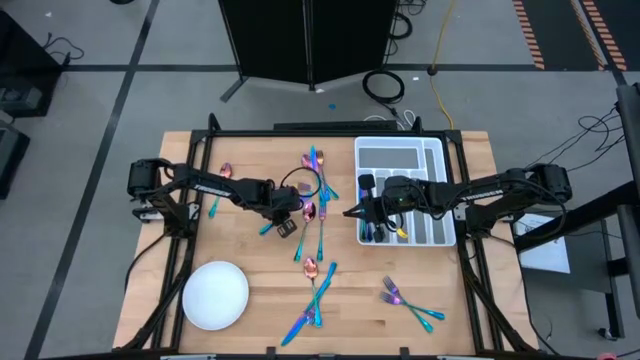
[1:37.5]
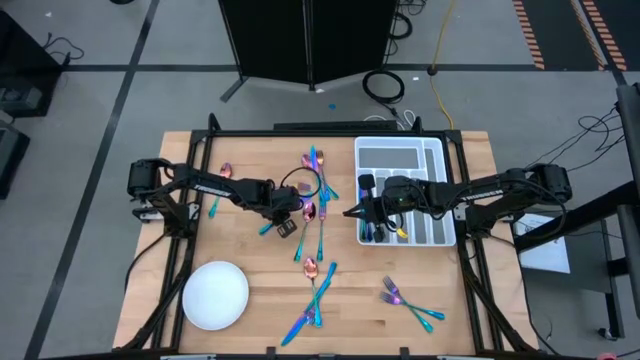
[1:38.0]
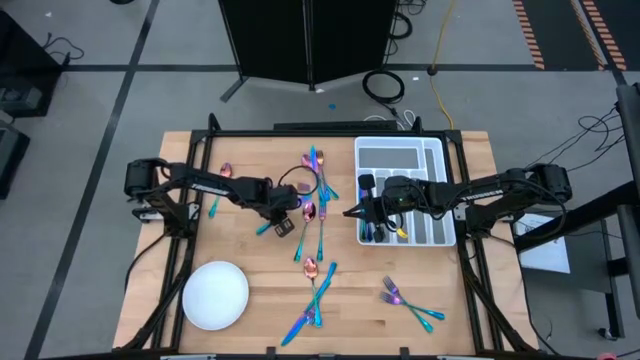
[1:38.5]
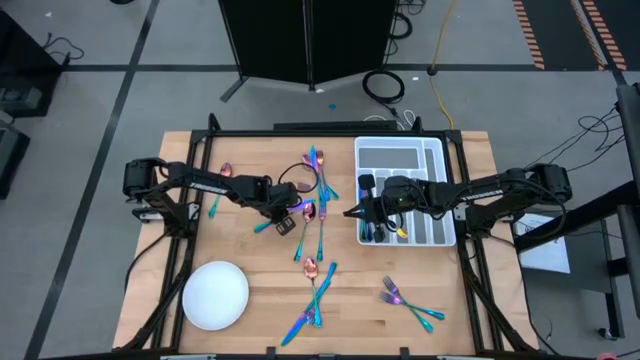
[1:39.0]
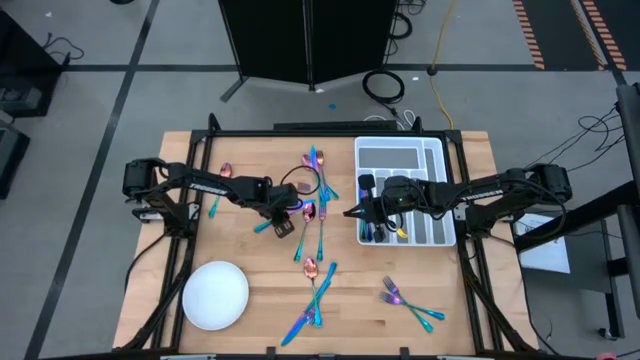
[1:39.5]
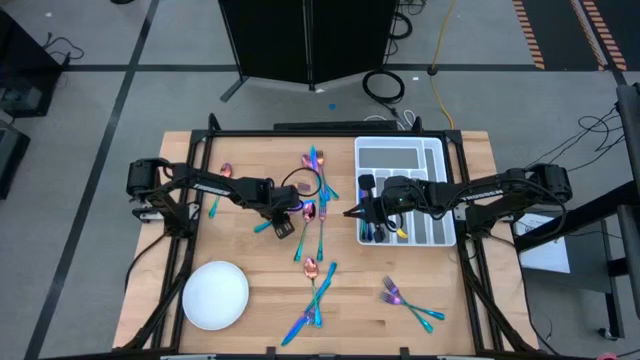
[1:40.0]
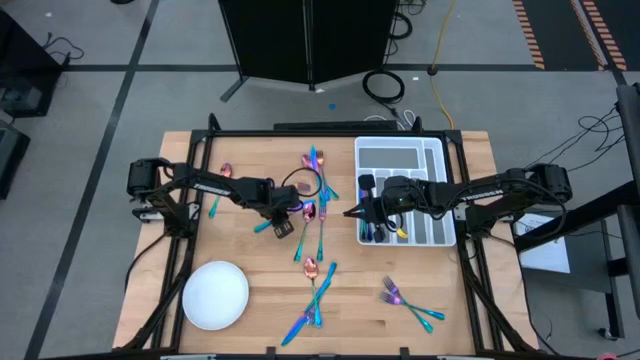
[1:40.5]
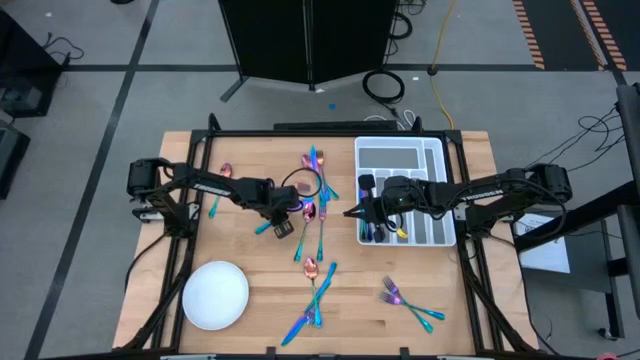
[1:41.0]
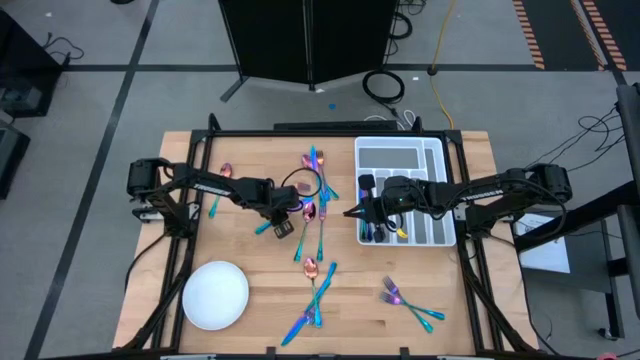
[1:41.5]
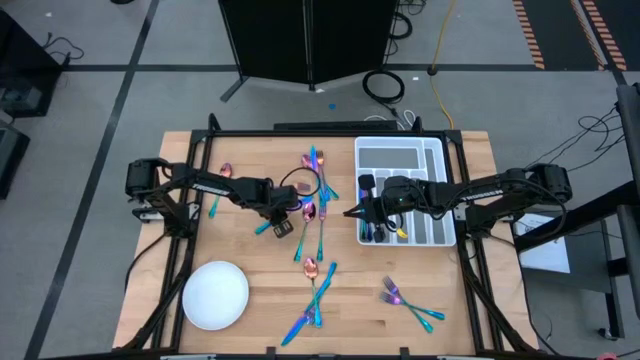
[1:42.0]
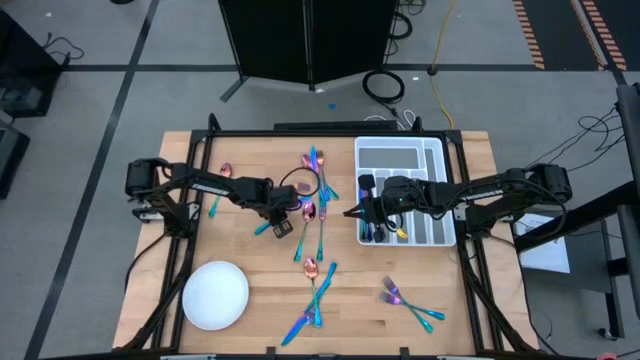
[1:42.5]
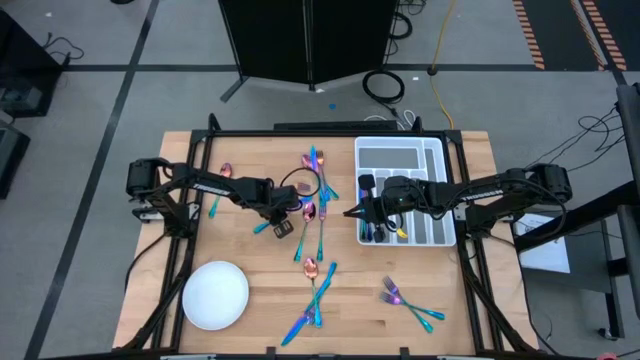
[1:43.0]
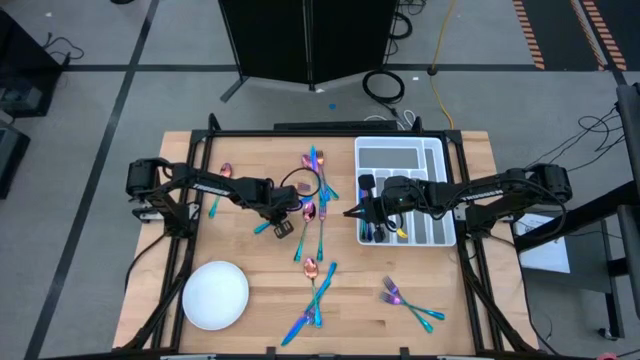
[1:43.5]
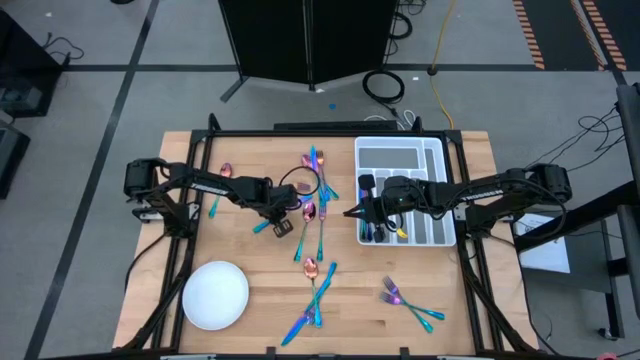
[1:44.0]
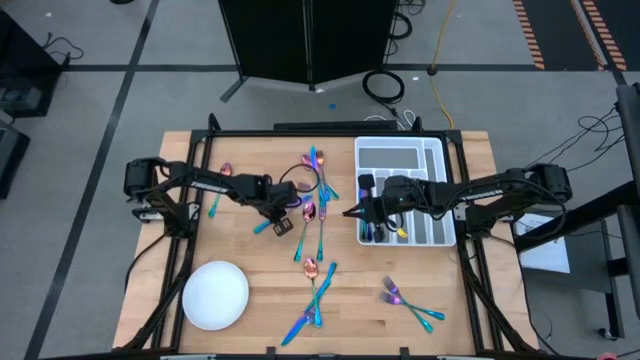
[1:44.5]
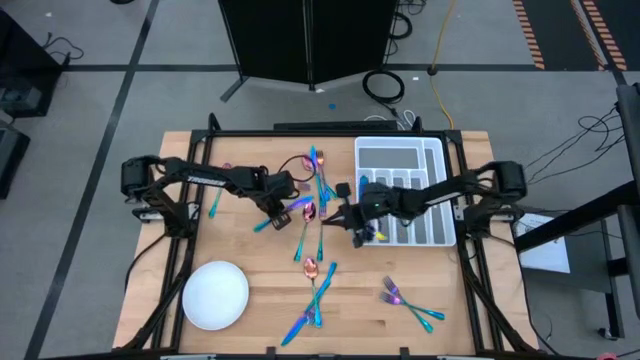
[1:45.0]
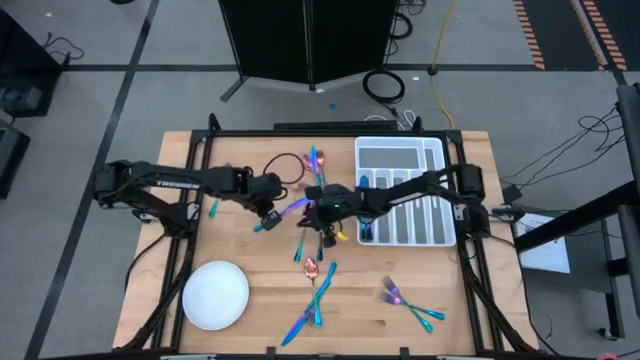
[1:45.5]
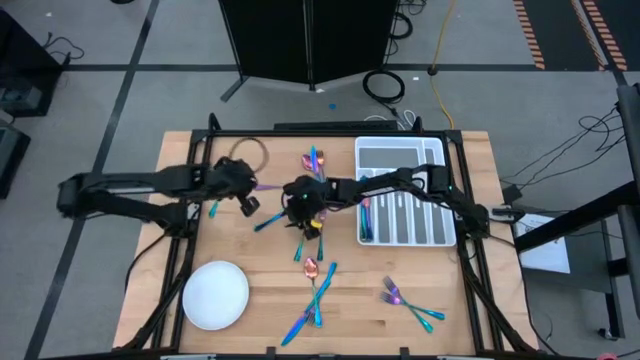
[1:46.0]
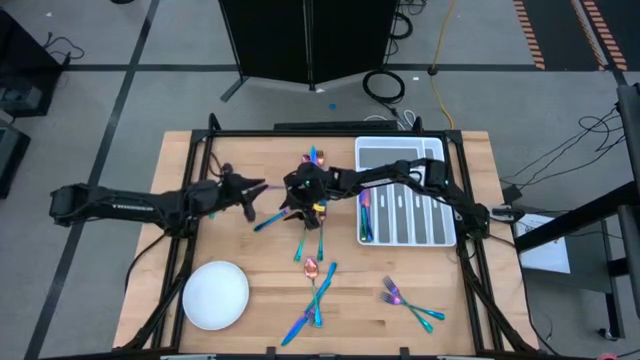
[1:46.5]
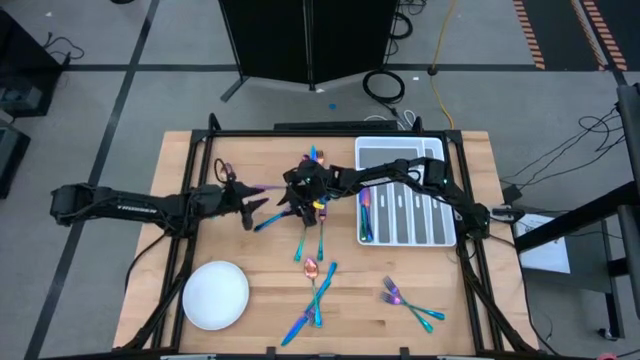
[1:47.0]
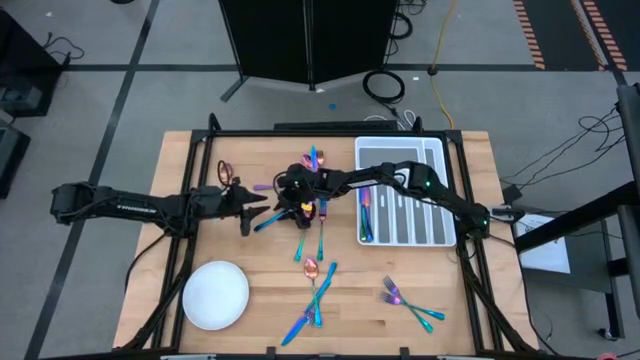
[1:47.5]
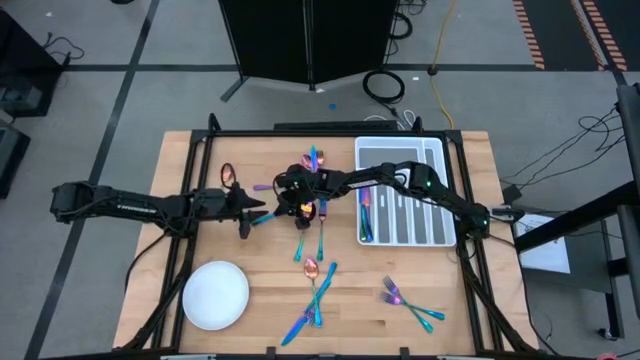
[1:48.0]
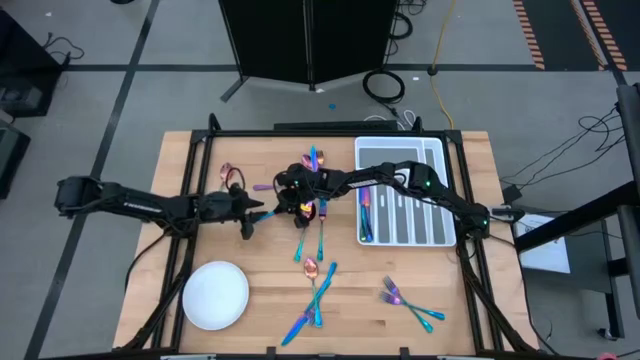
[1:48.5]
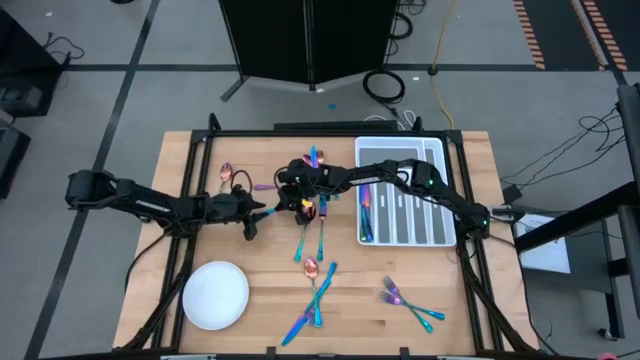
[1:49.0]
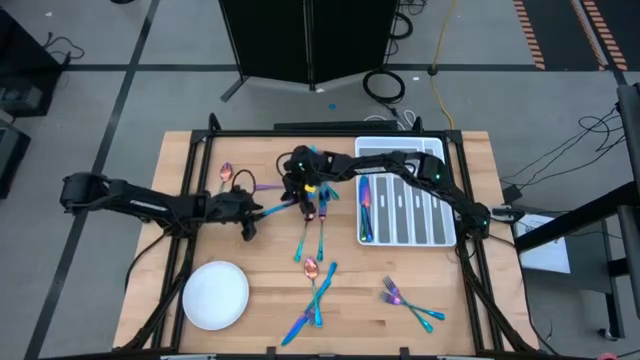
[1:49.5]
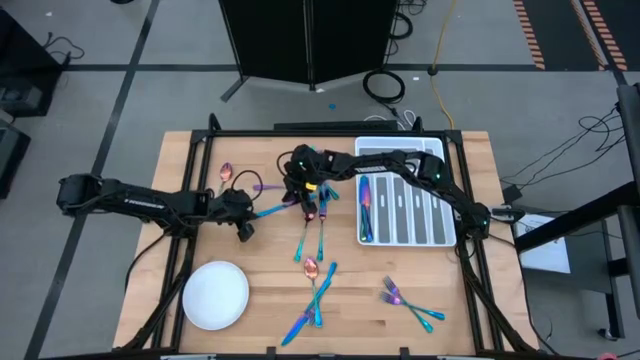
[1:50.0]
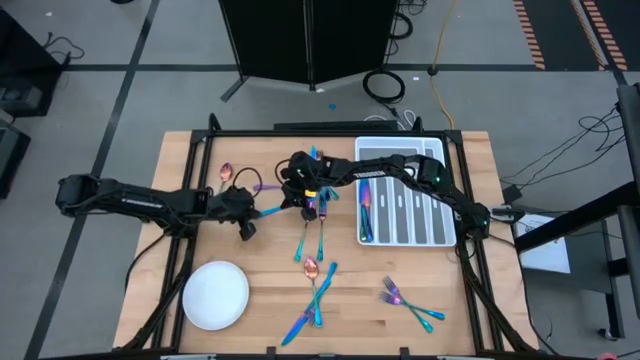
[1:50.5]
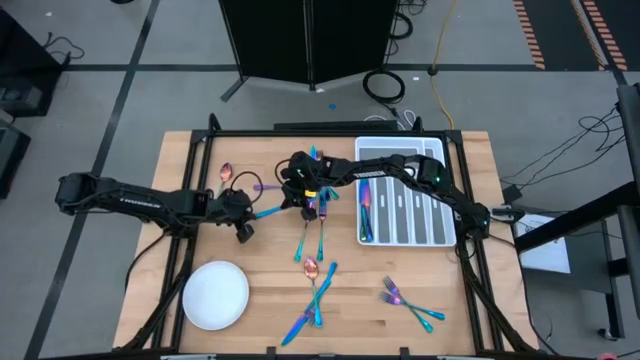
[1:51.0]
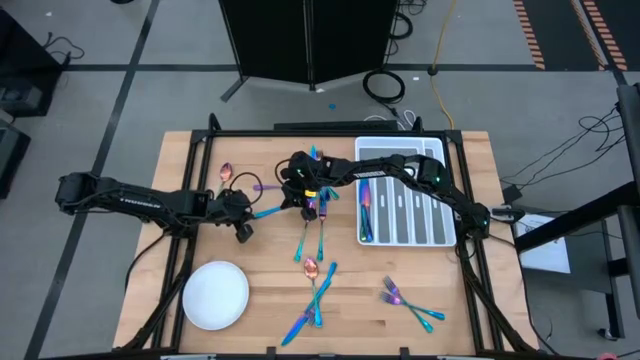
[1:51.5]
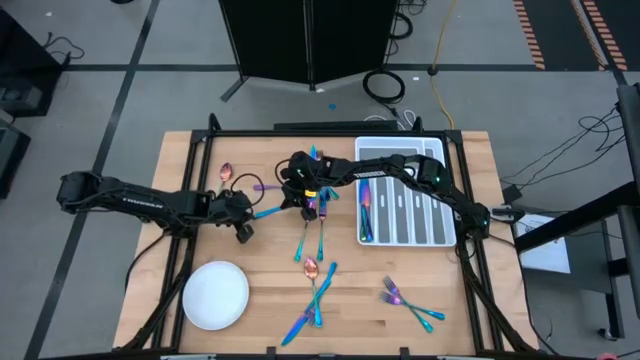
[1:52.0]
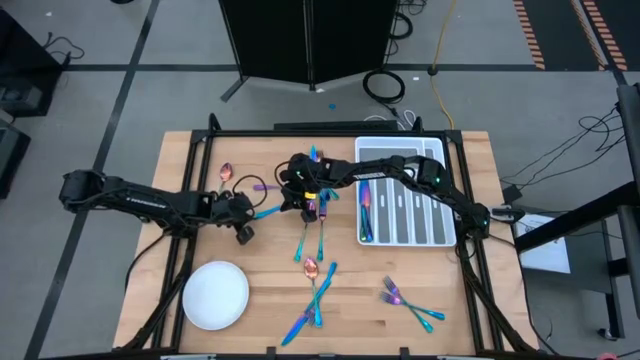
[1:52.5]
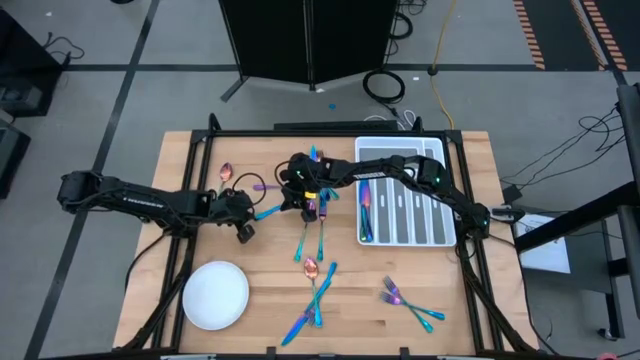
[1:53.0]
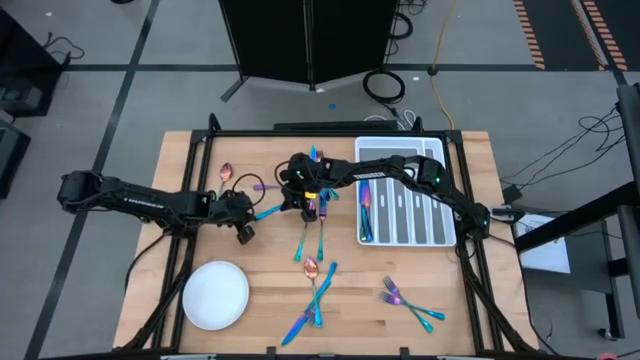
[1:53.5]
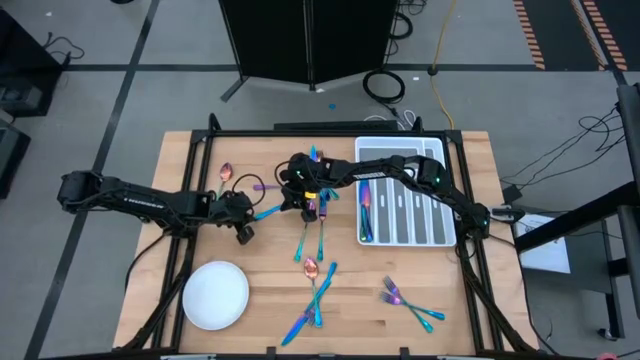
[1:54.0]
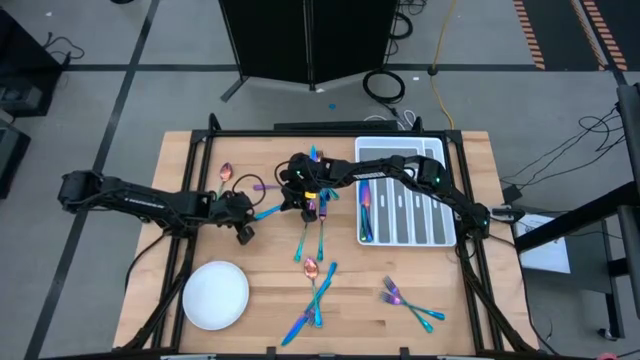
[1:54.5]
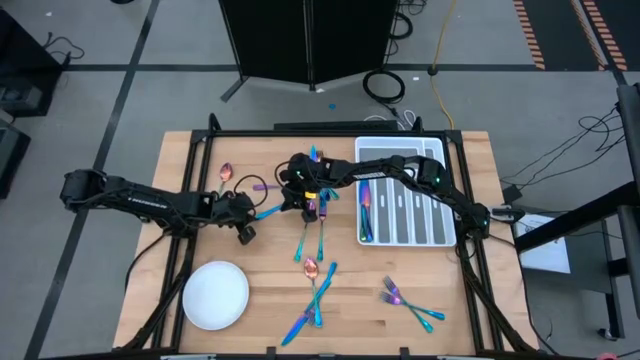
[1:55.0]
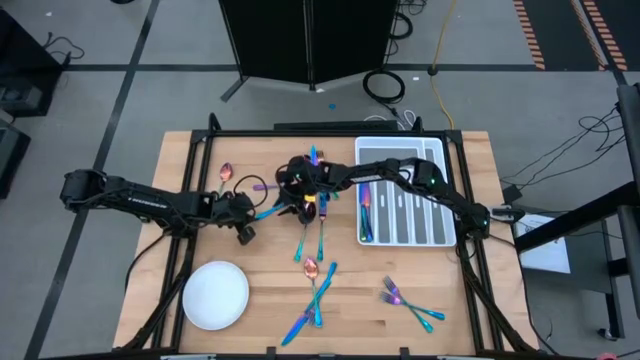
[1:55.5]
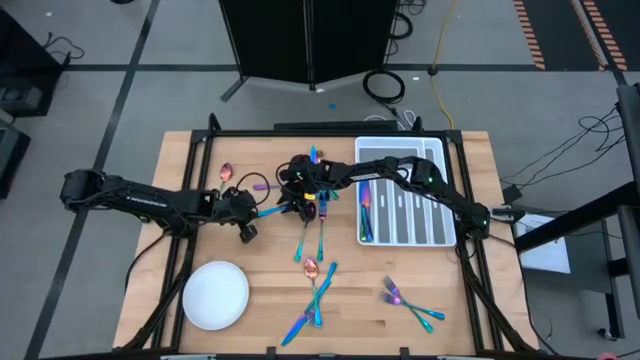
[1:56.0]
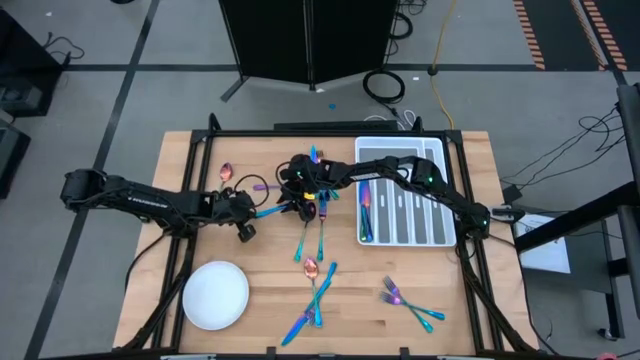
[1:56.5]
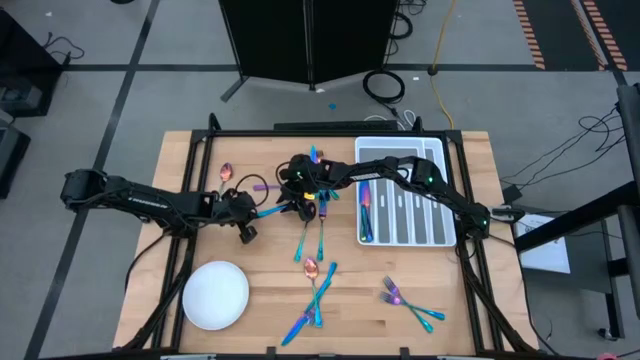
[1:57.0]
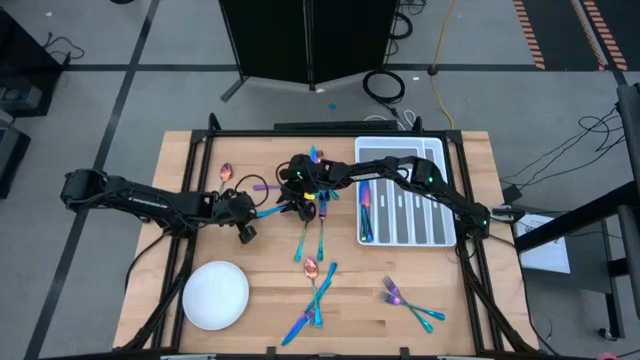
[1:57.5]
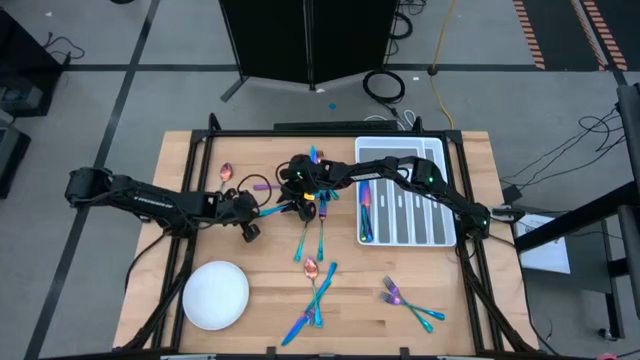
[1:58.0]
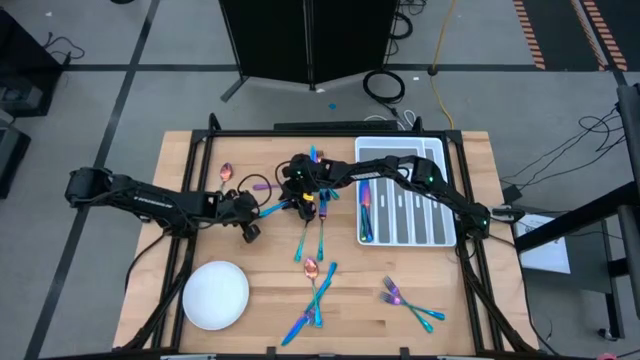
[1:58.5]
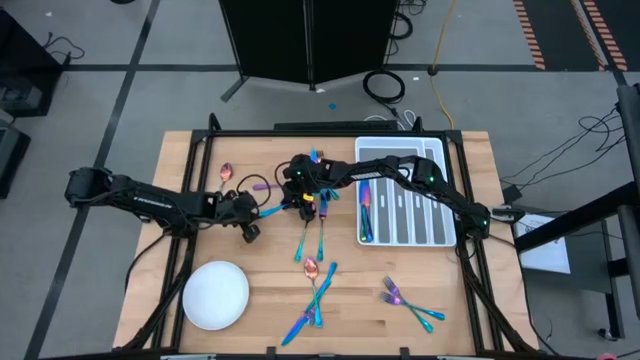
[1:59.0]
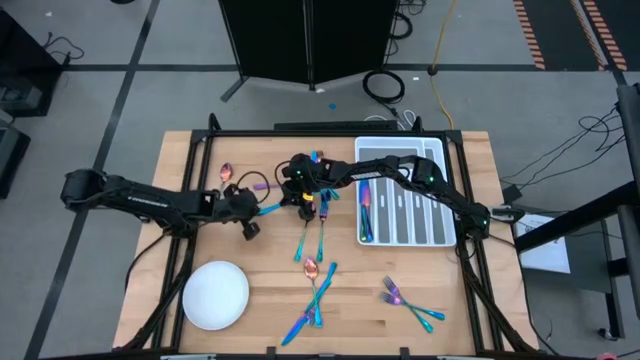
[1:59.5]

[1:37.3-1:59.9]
Task: Sort silverware
Put the blue knife into the utensil organizer
